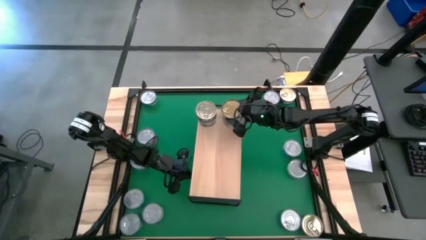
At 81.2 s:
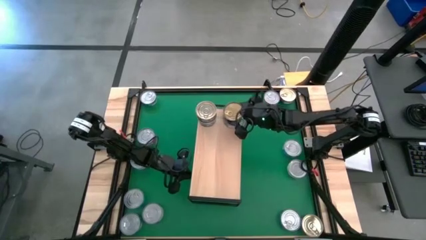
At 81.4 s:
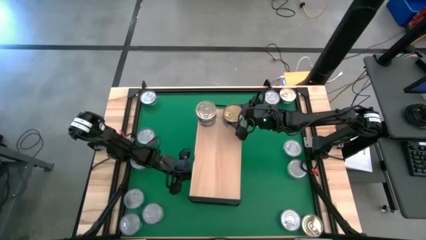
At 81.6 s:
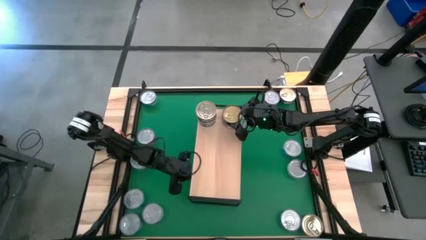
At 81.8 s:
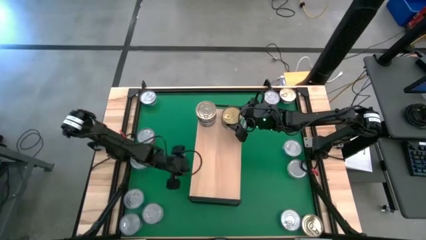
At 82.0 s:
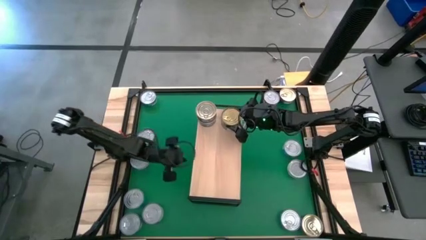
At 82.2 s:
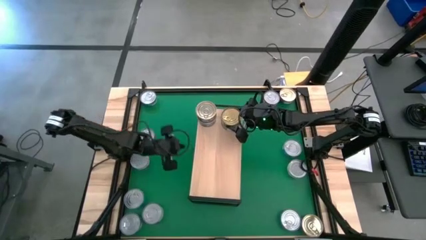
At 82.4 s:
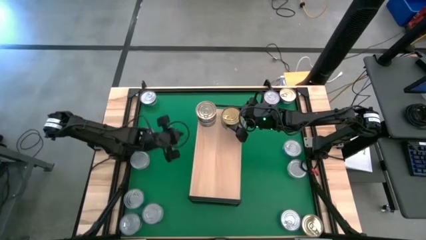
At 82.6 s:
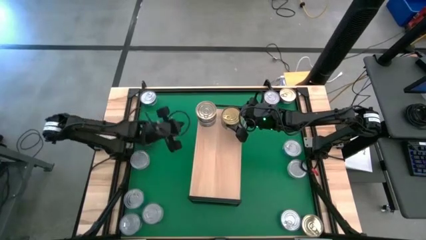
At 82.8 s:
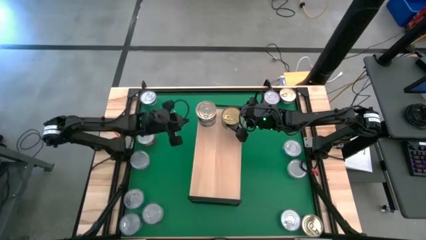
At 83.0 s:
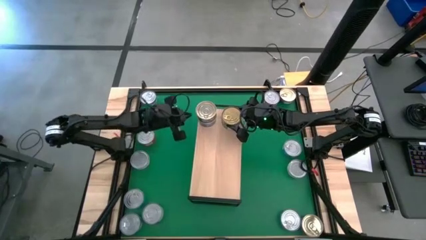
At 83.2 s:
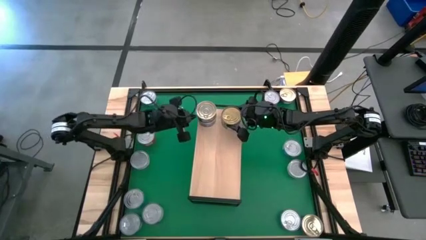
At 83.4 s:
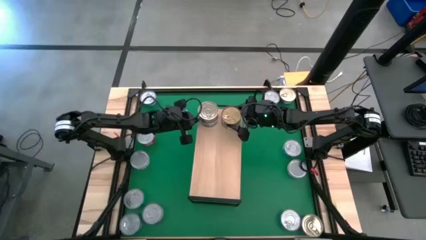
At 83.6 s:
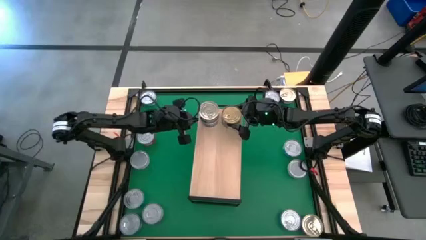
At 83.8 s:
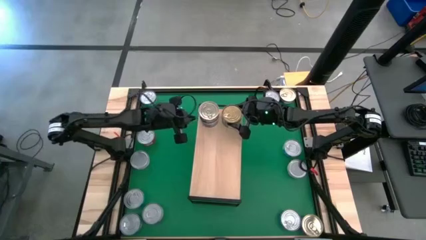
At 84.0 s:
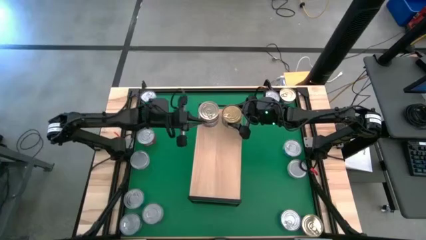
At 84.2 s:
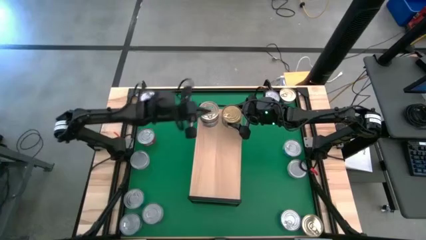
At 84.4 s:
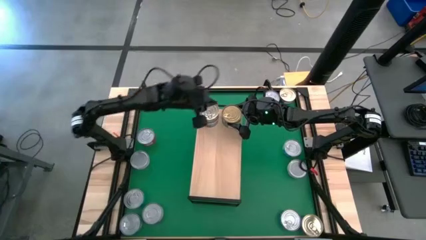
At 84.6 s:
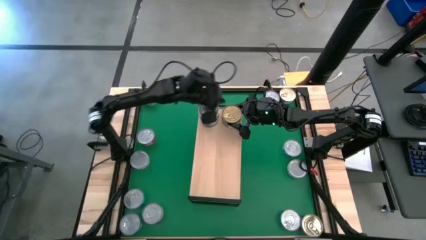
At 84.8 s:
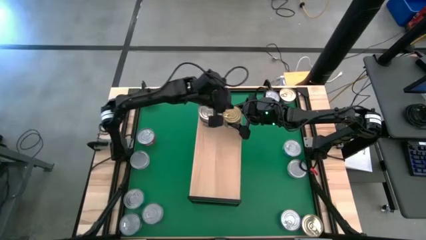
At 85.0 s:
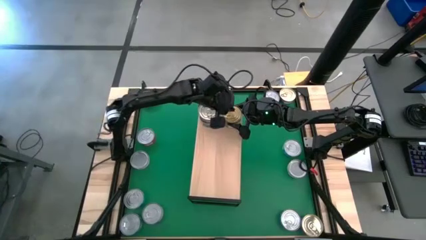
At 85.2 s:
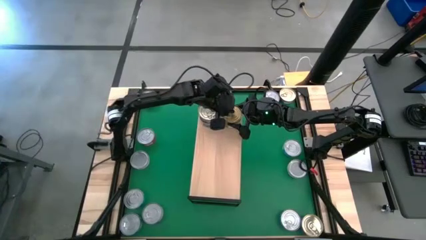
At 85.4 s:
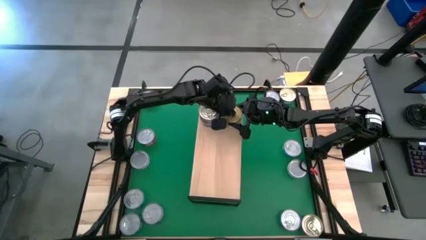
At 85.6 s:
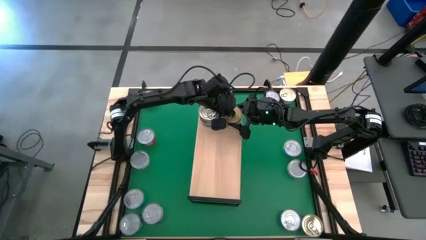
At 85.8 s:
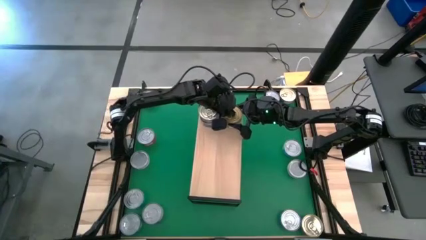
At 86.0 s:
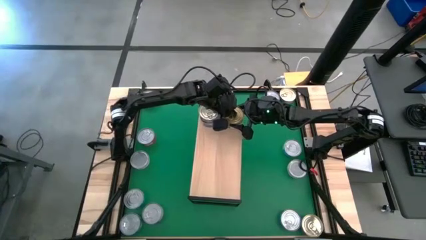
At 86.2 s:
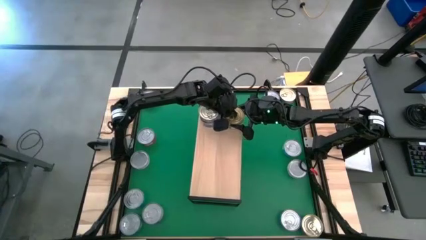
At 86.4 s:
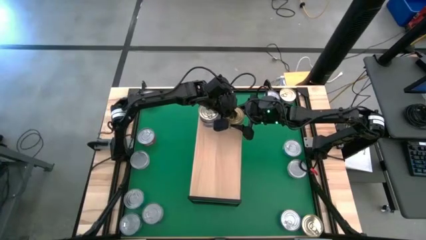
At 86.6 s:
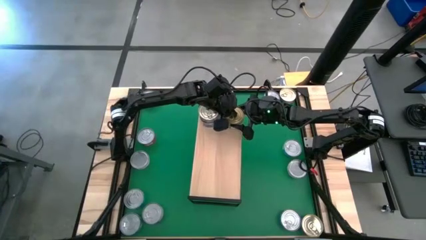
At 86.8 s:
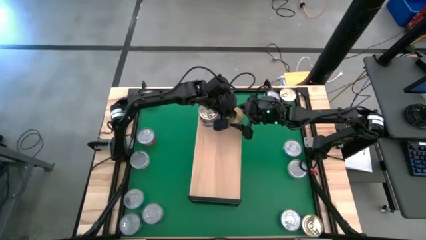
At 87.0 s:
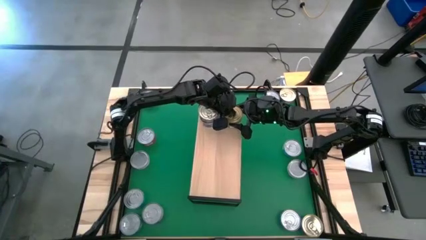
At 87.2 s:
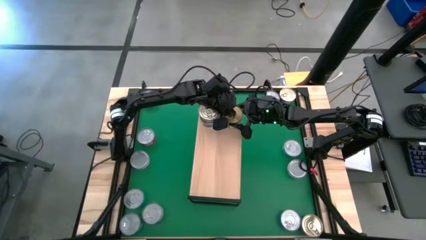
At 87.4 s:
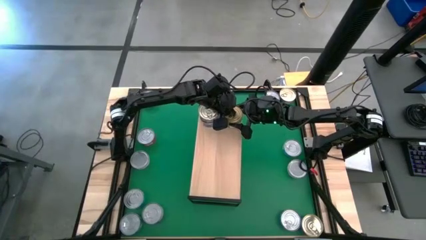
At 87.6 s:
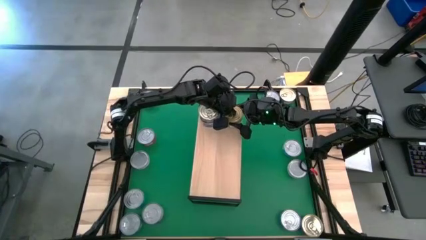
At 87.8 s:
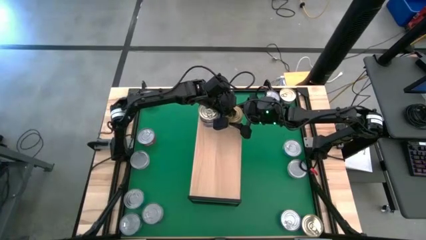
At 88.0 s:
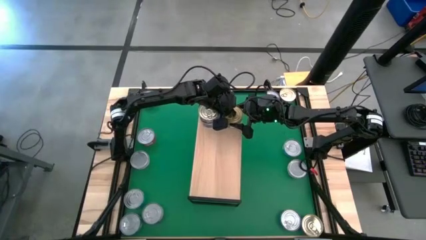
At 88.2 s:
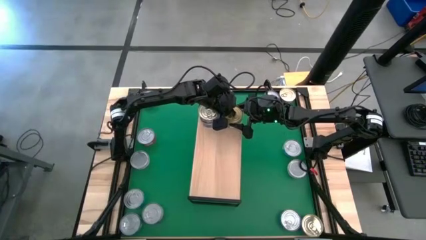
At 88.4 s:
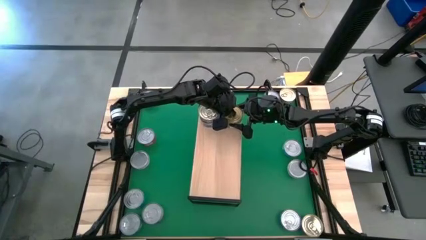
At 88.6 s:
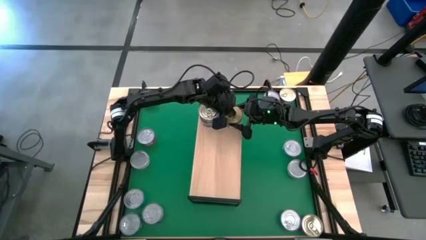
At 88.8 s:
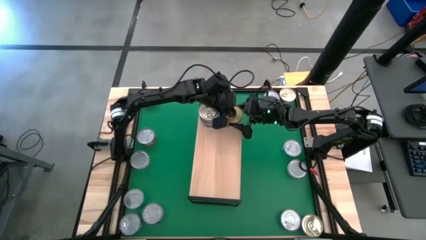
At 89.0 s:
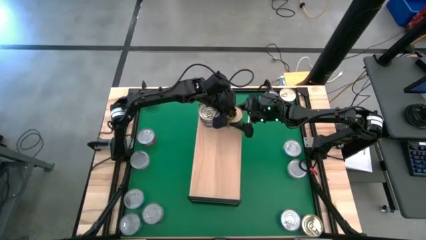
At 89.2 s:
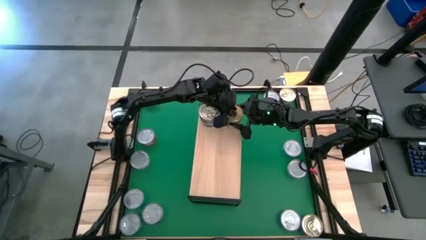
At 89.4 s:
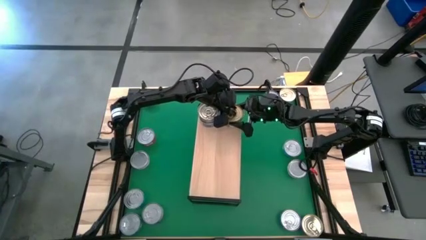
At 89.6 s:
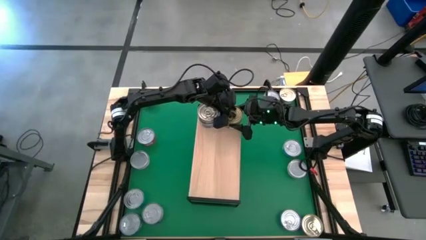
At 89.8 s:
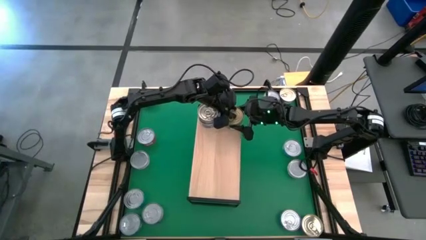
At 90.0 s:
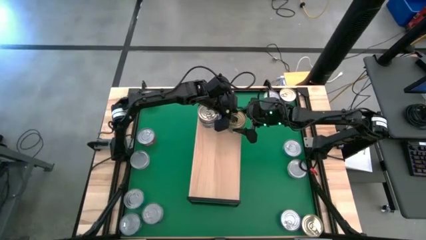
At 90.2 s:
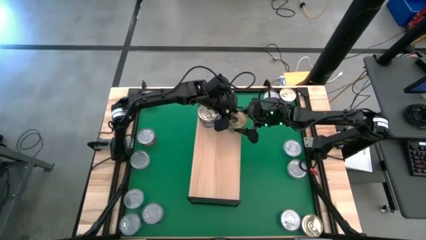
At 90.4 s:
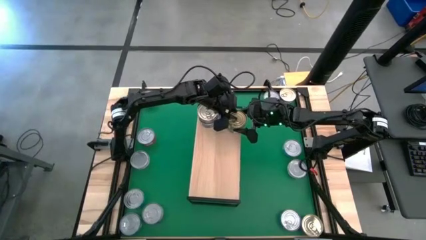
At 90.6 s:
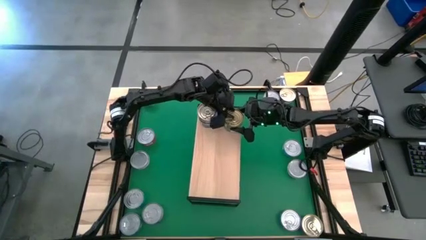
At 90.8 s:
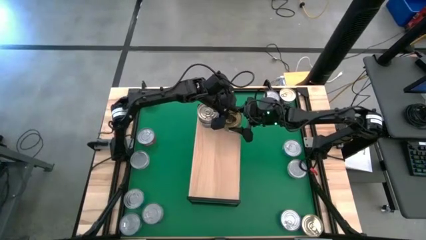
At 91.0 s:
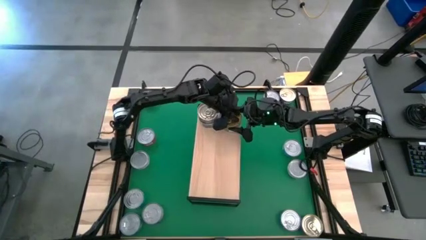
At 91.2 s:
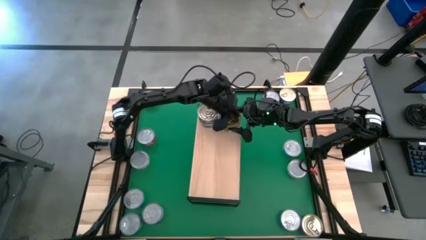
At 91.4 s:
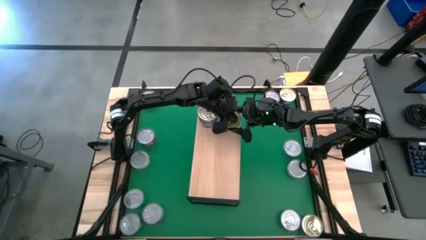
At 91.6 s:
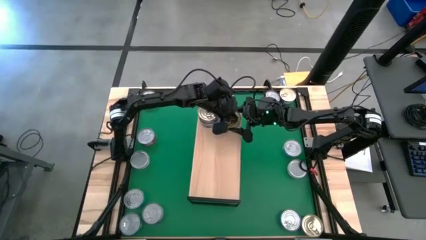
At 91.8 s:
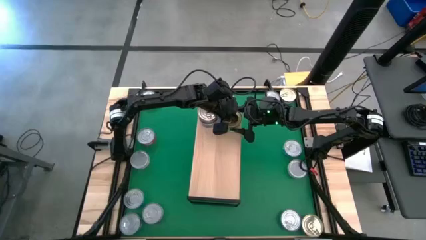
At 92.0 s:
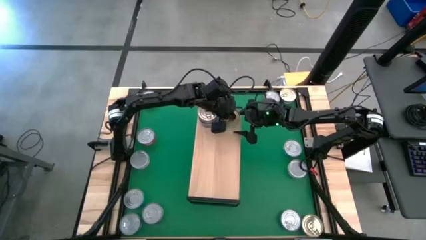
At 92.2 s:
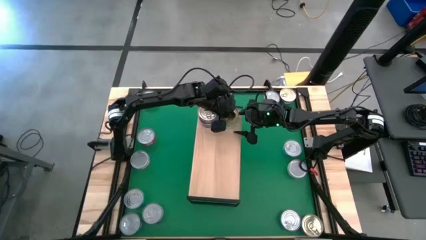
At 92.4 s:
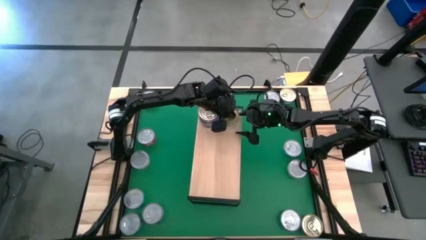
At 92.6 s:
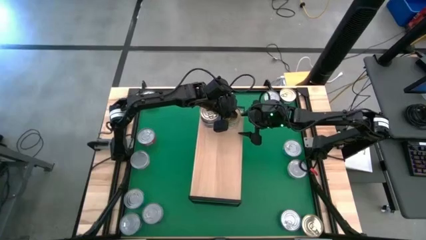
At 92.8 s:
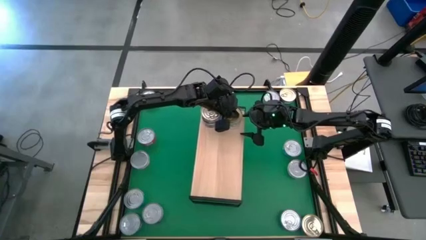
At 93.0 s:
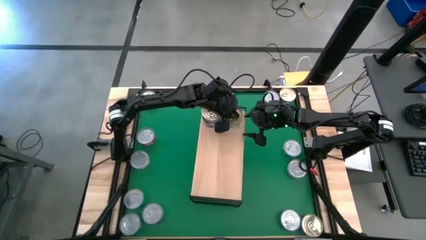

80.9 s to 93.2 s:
Task: Stack canned seafood by type on shelf
Stack the green tuna can on top of the other green tuna can on the shelf
